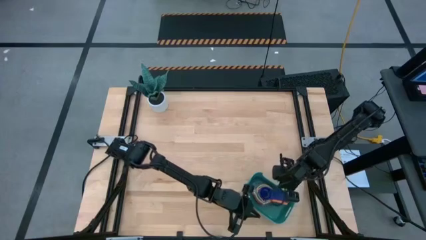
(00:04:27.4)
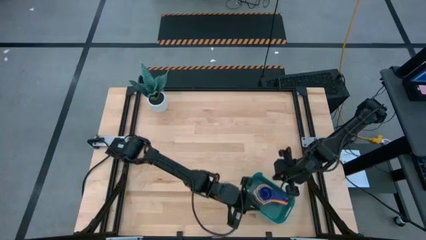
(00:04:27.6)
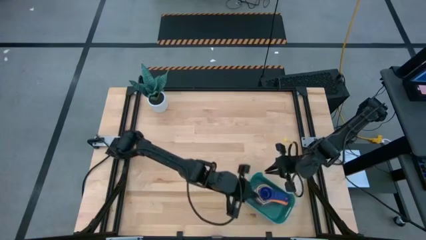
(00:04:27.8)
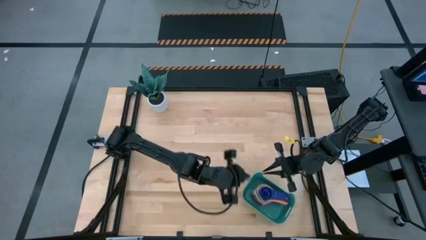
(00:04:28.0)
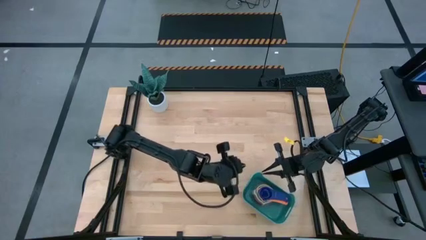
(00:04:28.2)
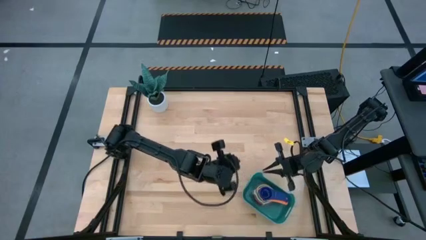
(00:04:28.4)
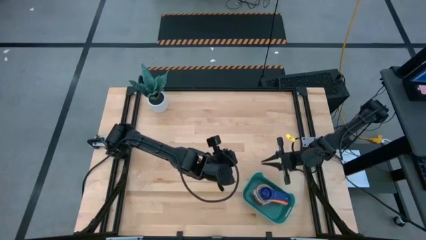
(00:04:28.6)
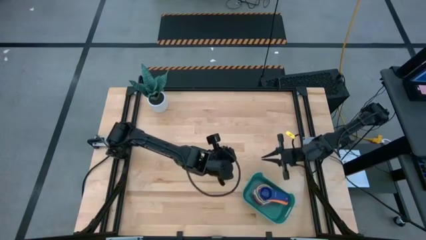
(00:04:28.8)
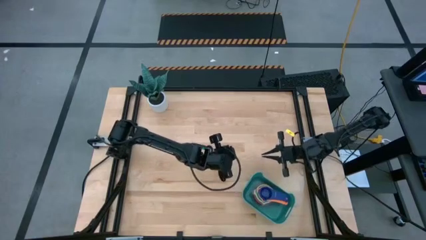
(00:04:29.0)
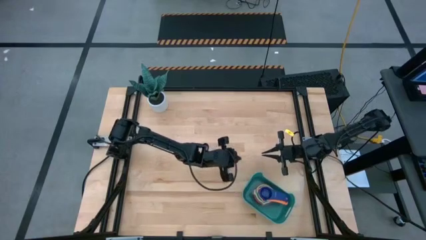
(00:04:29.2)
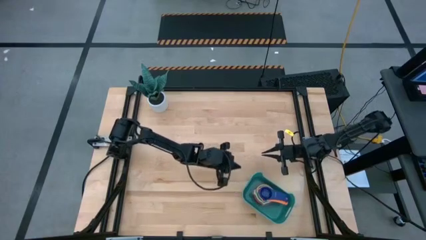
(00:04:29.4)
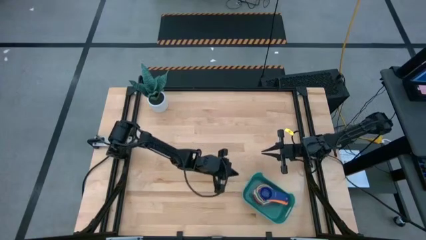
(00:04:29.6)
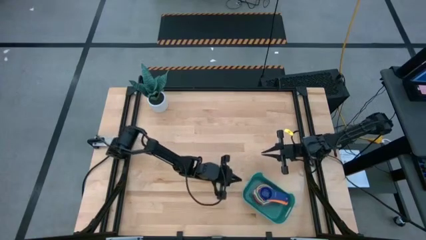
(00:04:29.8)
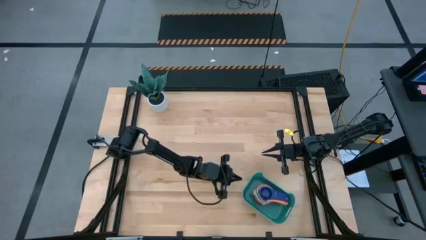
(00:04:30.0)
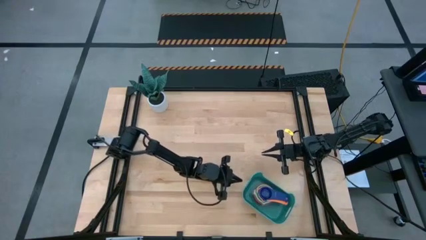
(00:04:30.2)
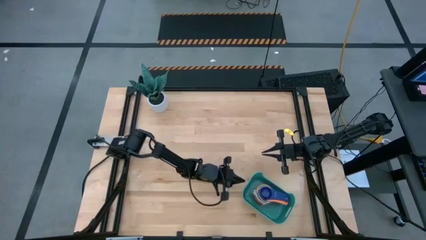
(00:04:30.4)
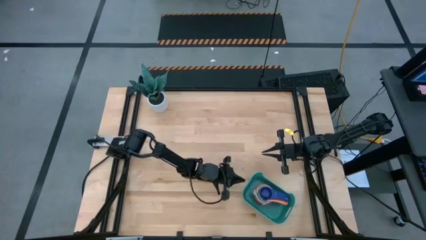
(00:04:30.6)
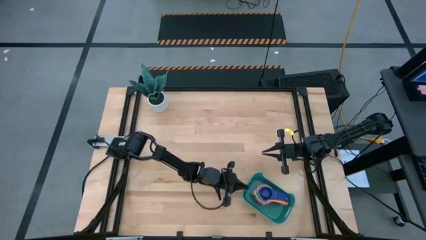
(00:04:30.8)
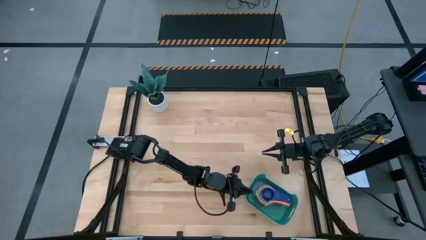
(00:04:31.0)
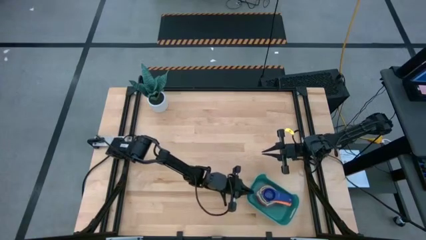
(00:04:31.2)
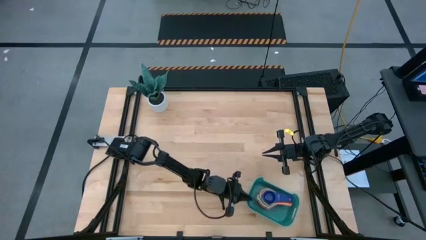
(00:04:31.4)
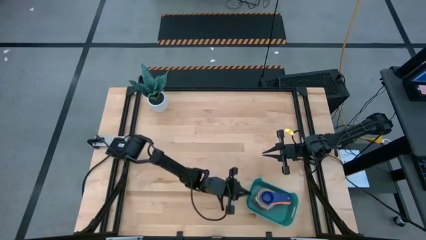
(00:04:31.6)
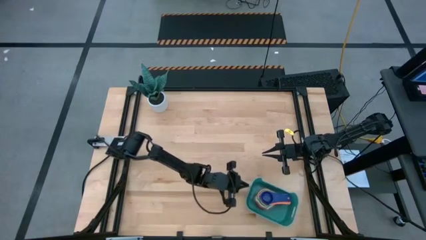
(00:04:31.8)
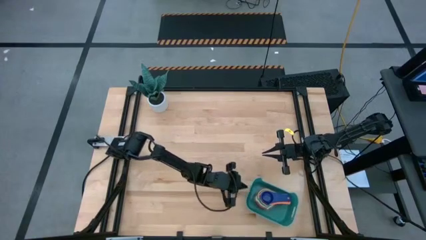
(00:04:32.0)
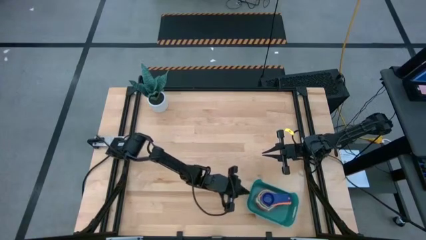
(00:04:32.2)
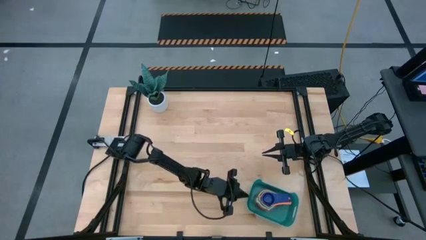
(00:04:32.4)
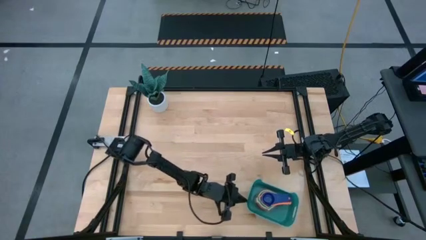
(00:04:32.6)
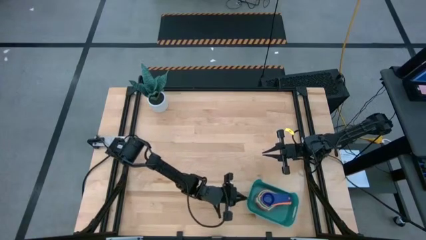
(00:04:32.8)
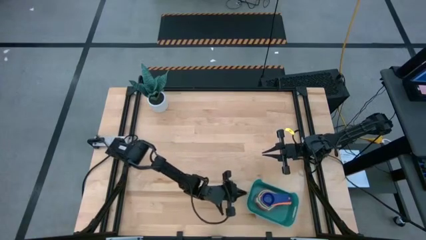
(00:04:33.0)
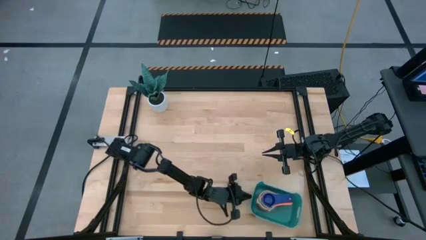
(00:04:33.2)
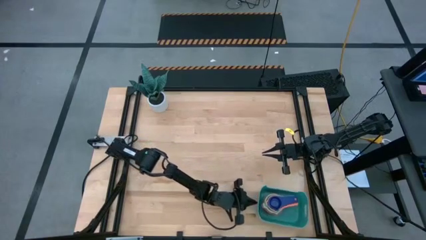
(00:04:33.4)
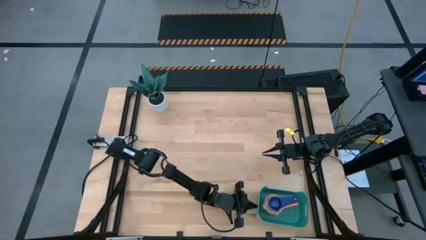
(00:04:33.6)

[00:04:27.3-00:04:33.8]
Task: Nest measuring cups in basket
Adjust the green bin

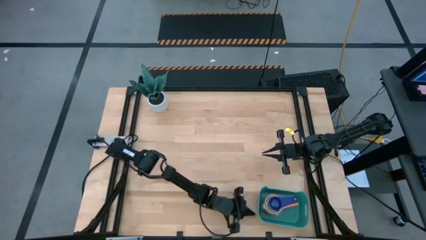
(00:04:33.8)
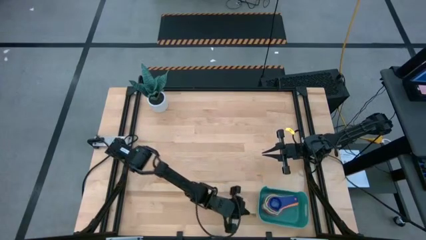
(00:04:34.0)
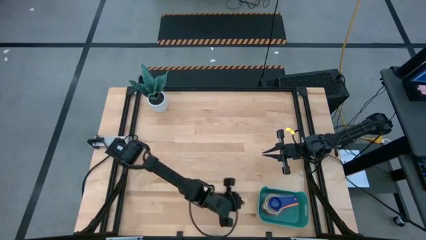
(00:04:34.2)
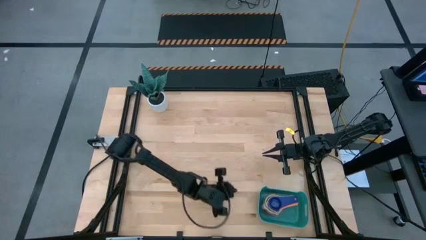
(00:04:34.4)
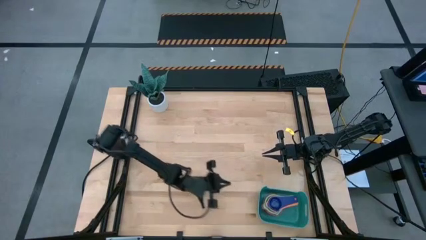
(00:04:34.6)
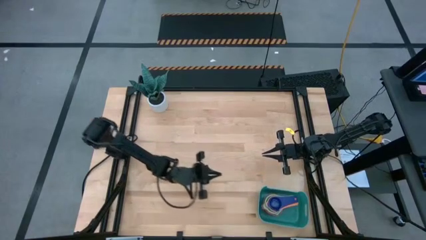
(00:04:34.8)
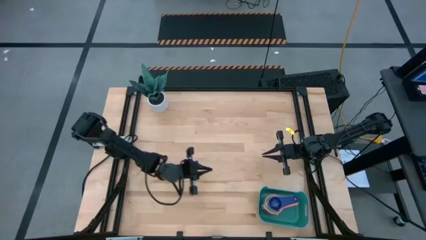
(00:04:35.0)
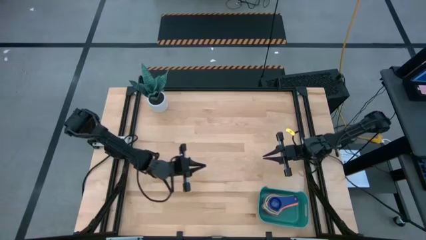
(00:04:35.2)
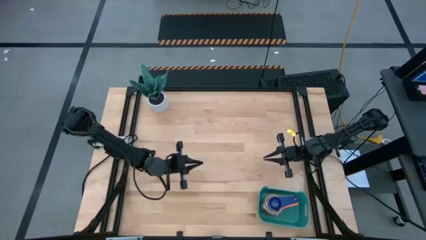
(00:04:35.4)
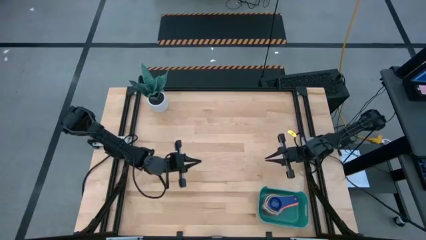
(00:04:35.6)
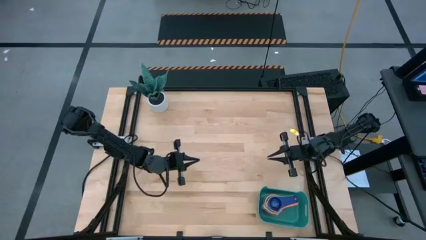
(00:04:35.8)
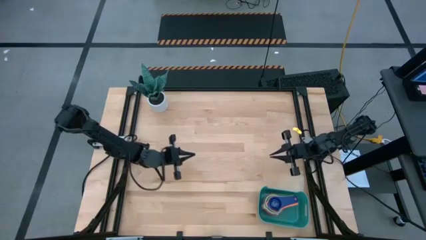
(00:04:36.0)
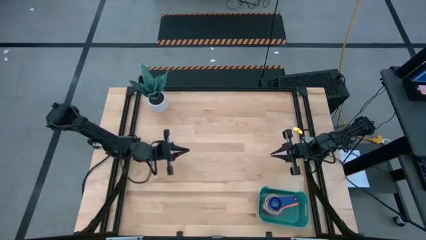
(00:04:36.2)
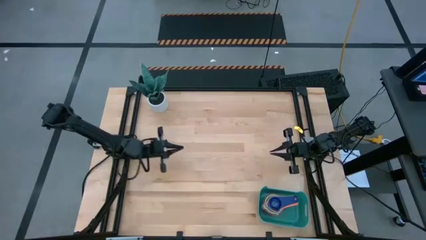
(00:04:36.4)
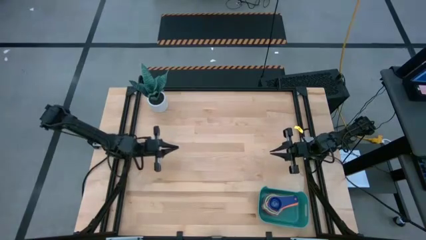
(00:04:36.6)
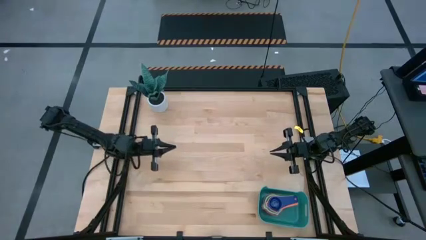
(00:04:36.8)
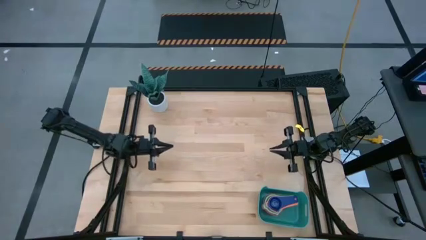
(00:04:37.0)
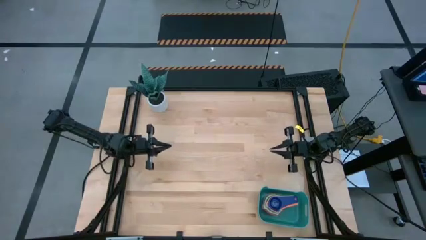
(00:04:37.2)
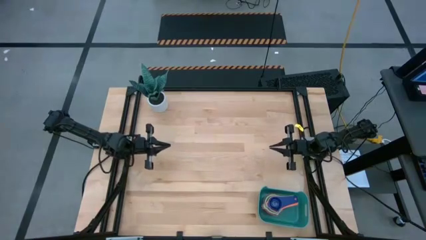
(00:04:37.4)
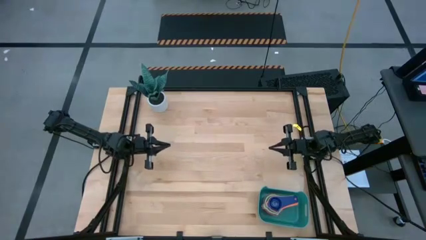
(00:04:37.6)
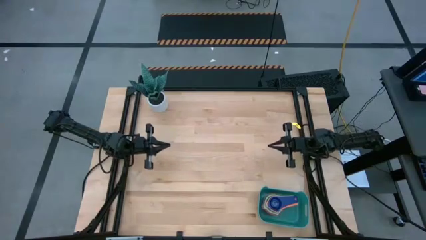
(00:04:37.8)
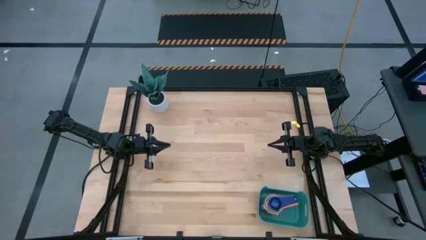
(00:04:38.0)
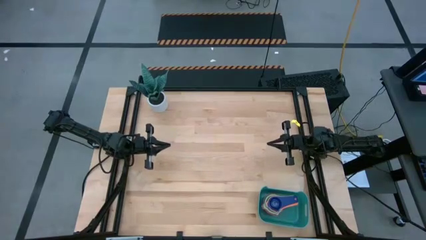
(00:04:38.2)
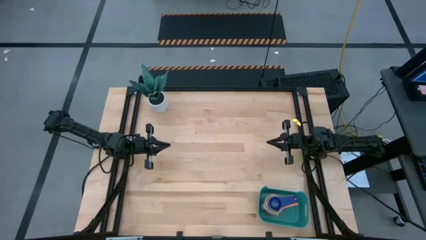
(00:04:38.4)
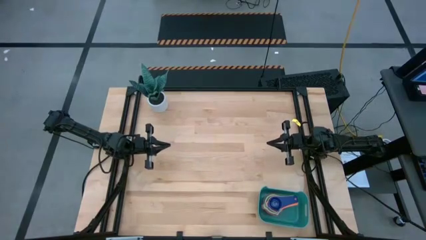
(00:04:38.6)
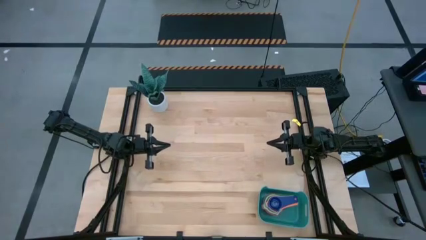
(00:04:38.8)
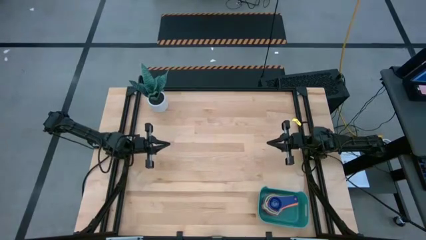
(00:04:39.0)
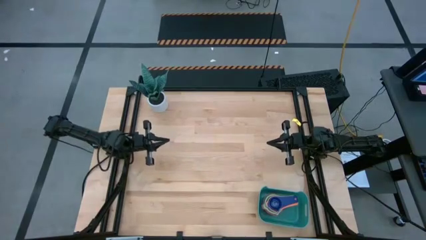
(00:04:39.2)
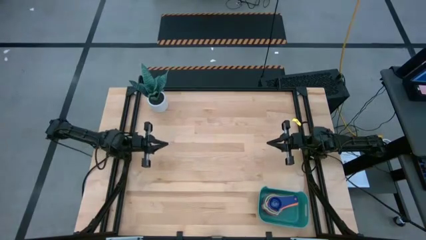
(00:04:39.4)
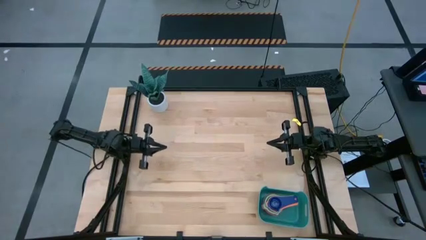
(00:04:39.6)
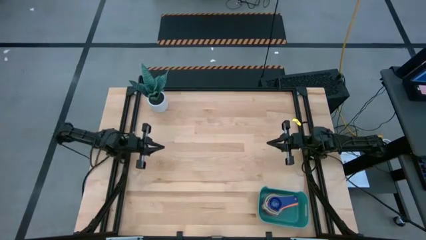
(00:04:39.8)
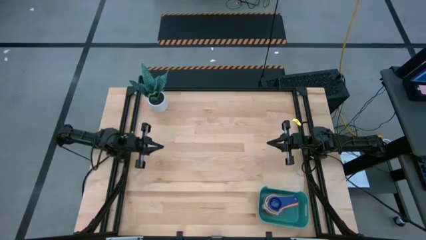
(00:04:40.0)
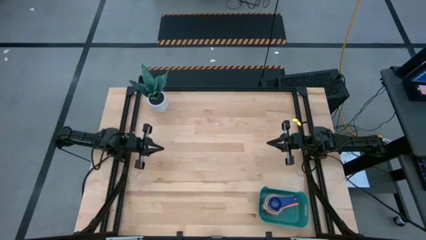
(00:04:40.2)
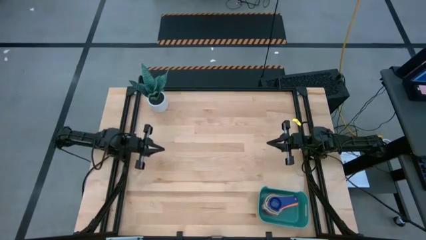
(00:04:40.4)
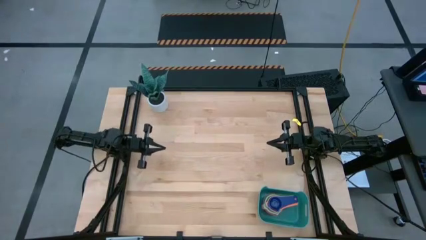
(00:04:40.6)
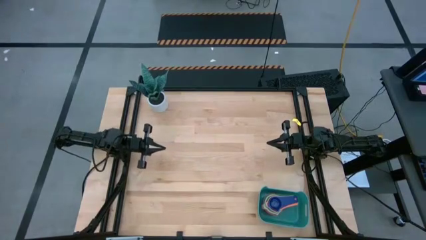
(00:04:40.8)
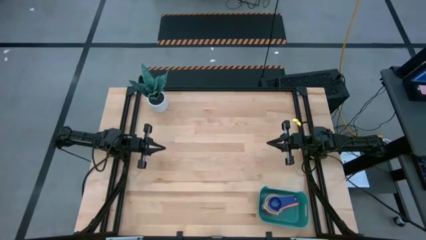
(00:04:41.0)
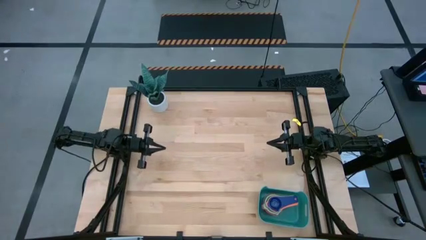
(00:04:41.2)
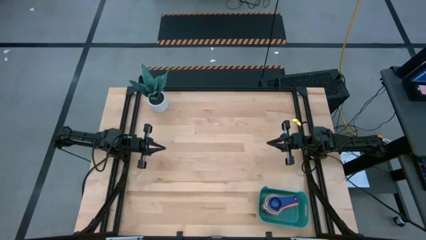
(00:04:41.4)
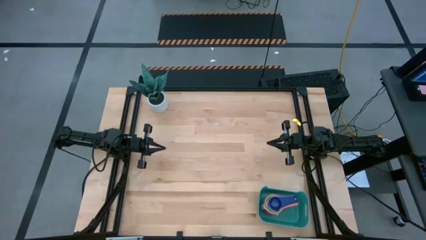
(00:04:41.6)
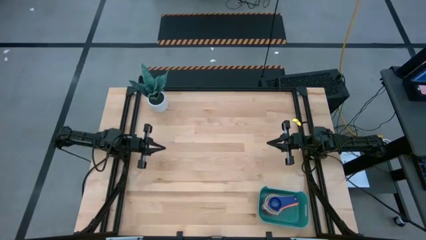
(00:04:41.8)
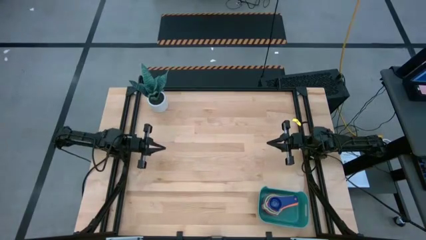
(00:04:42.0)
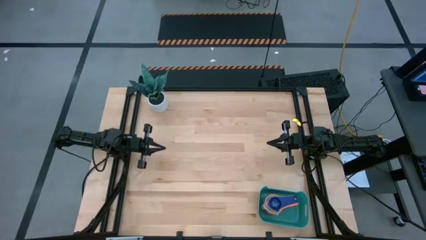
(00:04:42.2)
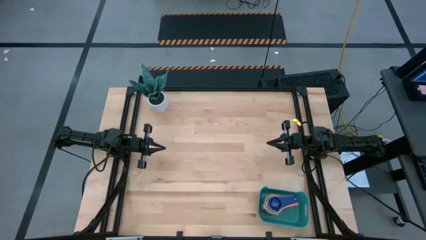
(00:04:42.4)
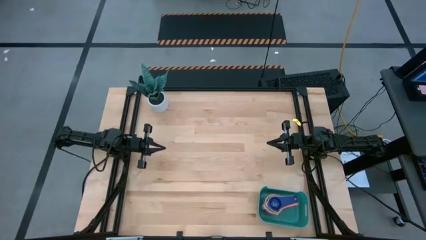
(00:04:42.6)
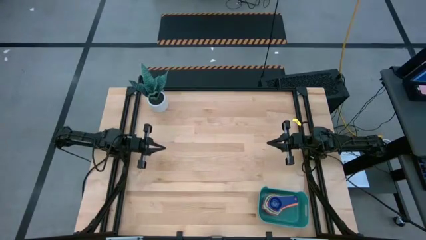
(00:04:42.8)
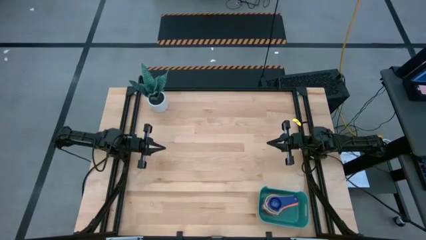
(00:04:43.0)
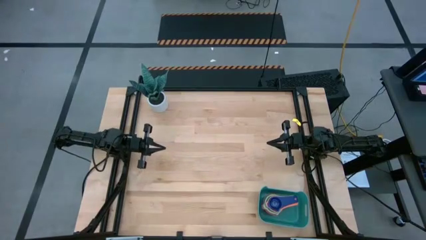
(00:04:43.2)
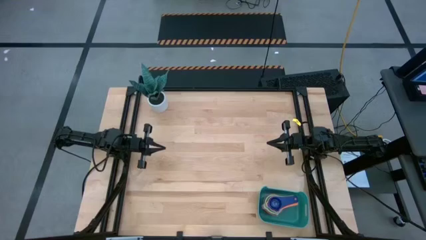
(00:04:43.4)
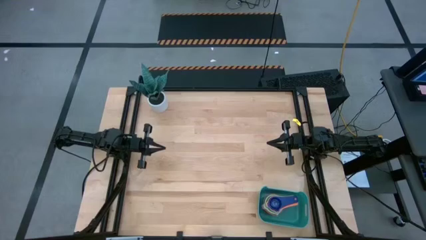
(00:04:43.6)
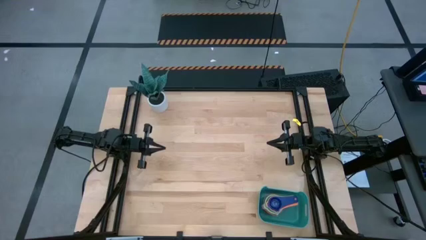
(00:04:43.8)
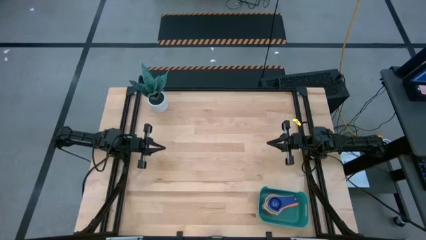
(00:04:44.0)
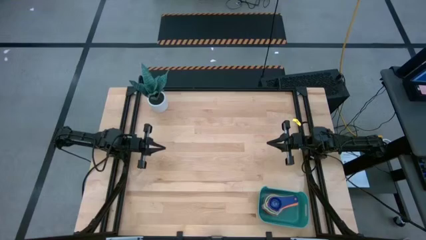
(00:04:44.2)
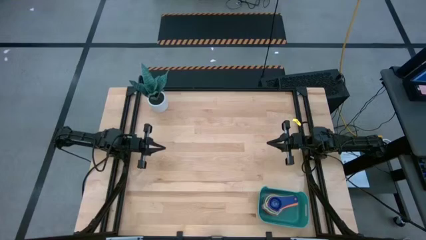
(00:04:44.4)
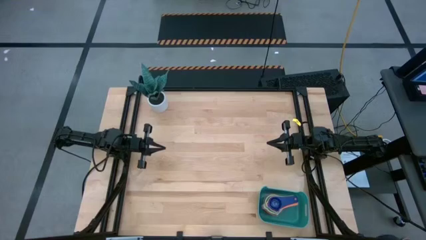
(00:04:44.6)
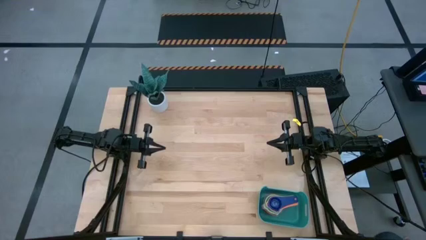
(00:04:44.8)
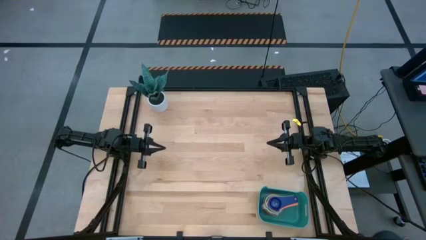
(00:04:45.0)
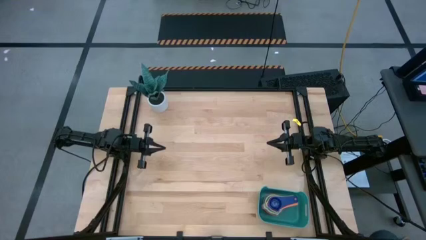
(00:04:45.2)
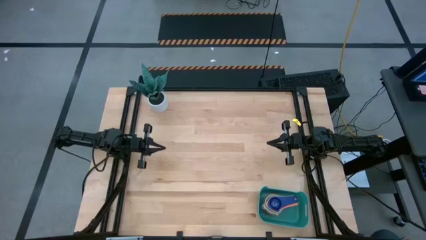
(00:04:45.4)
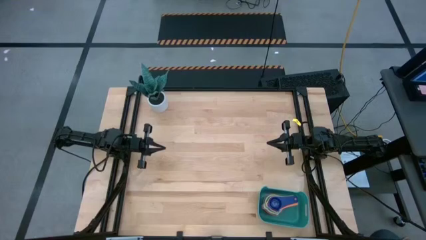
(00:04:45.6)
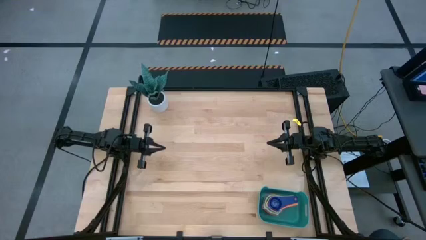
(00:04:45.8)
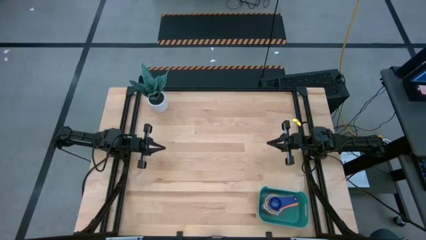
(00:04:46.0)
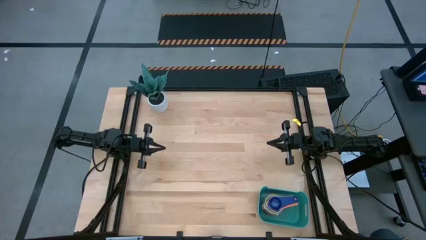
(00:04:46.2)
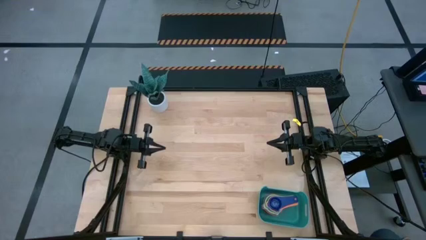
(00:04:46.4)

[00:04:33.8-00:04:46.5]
Return to Home Position
